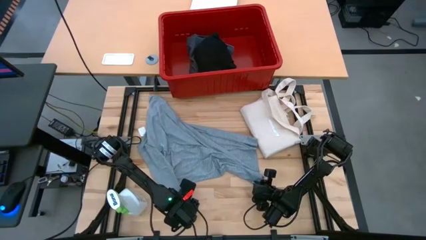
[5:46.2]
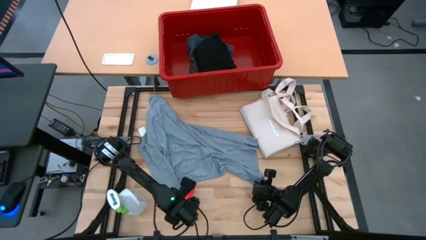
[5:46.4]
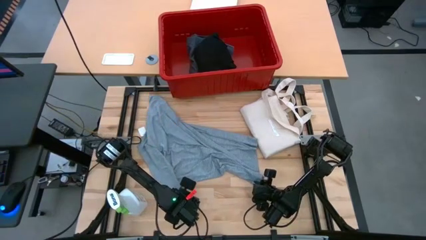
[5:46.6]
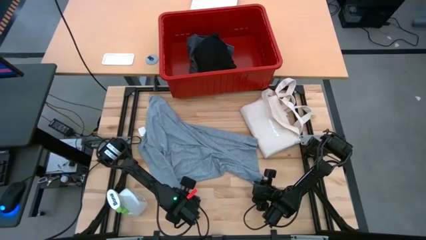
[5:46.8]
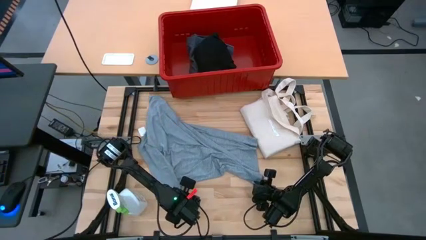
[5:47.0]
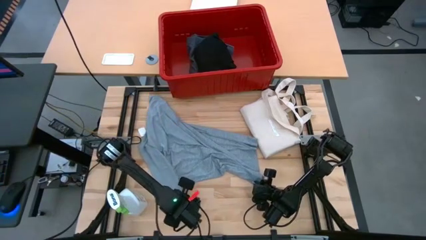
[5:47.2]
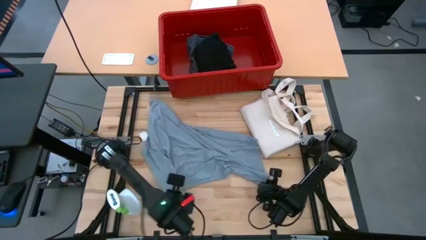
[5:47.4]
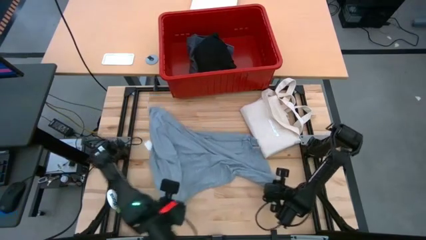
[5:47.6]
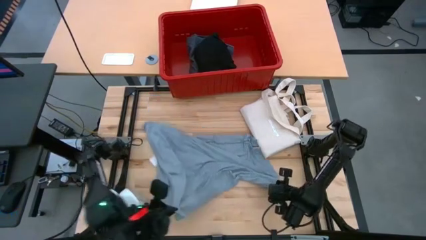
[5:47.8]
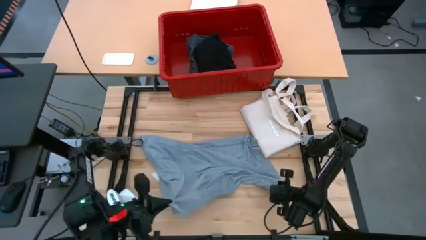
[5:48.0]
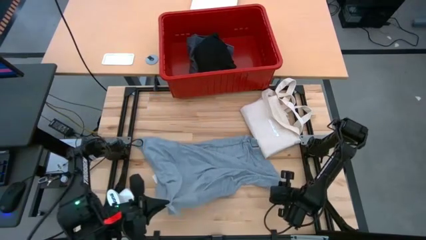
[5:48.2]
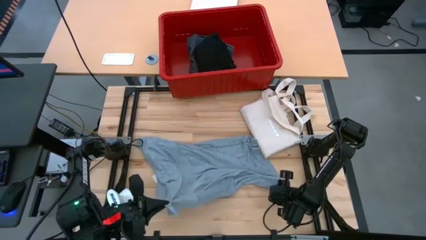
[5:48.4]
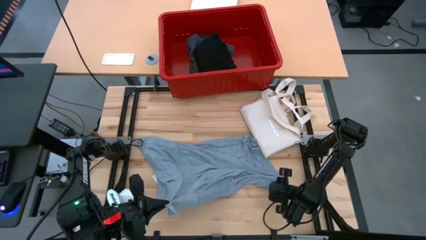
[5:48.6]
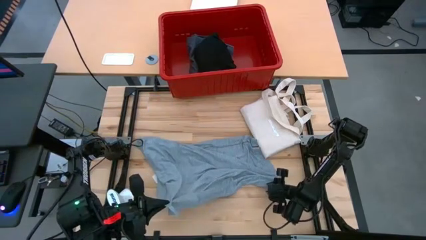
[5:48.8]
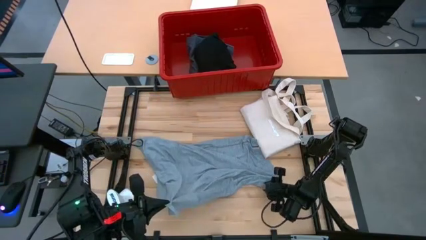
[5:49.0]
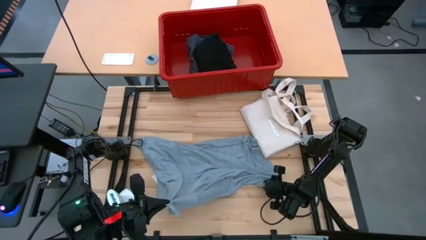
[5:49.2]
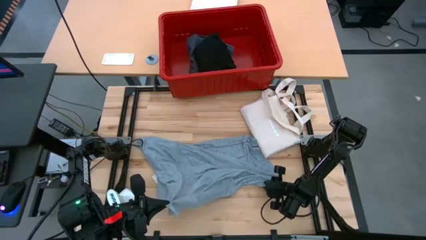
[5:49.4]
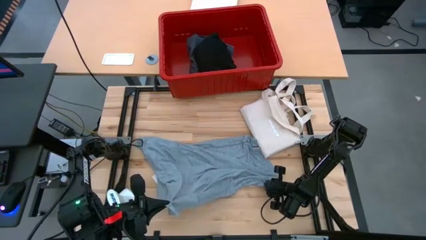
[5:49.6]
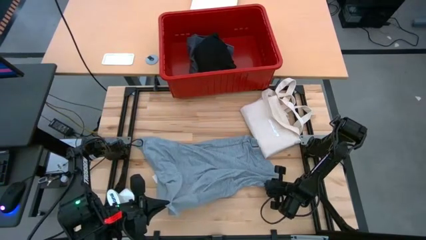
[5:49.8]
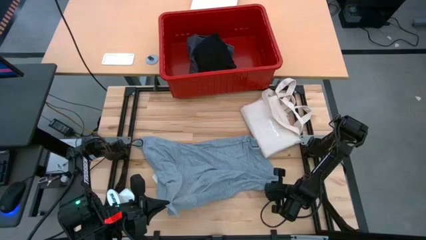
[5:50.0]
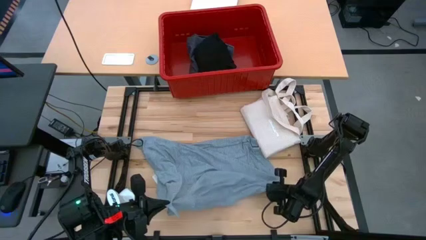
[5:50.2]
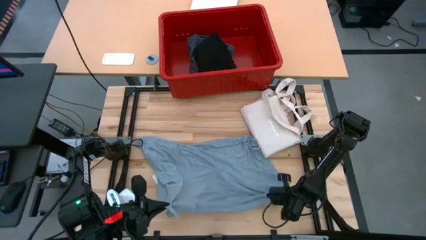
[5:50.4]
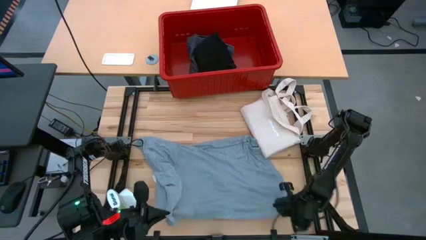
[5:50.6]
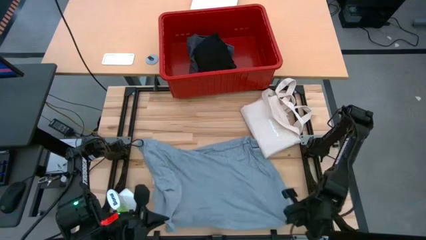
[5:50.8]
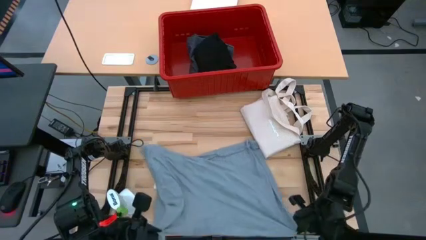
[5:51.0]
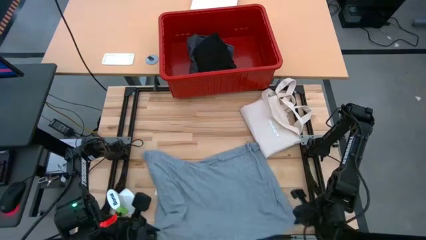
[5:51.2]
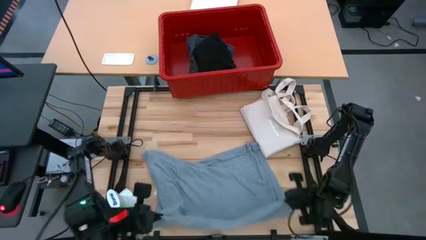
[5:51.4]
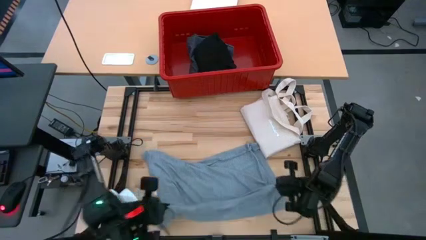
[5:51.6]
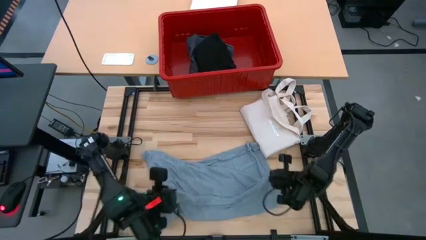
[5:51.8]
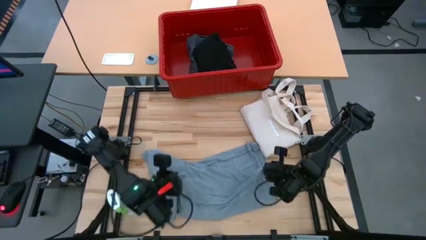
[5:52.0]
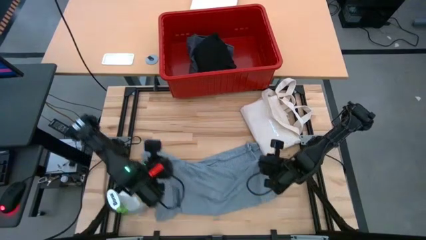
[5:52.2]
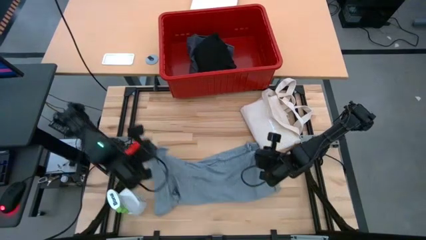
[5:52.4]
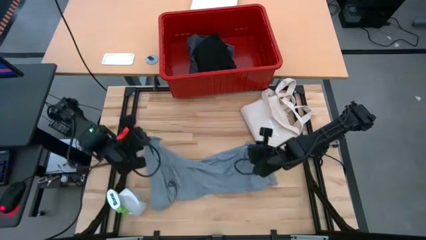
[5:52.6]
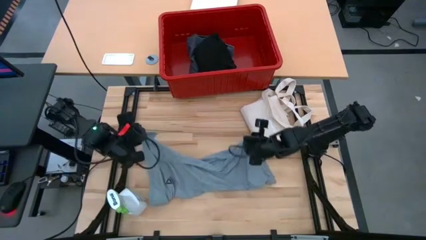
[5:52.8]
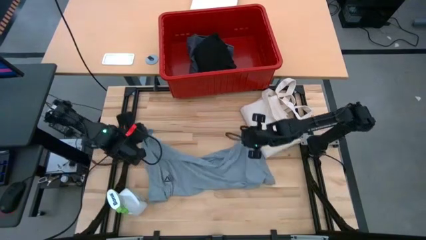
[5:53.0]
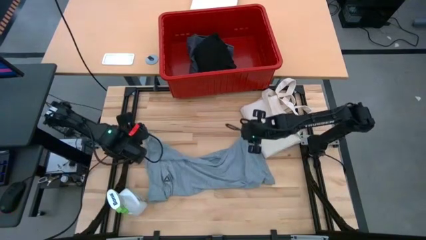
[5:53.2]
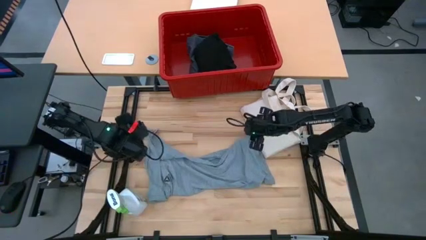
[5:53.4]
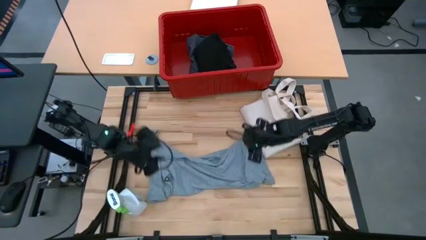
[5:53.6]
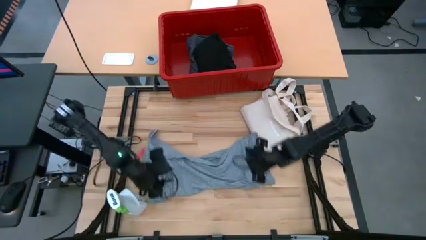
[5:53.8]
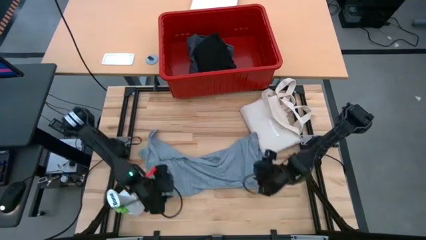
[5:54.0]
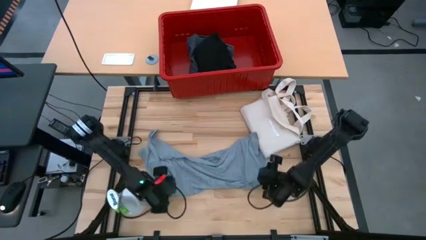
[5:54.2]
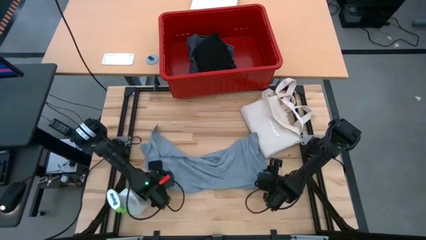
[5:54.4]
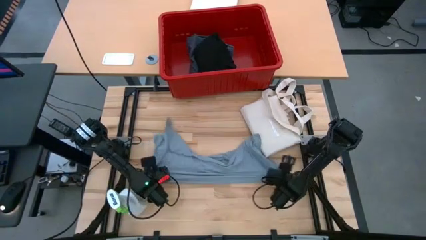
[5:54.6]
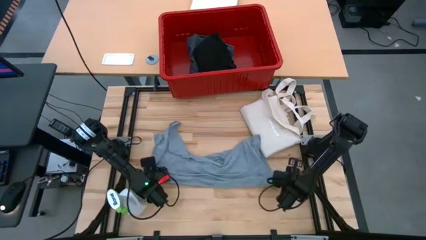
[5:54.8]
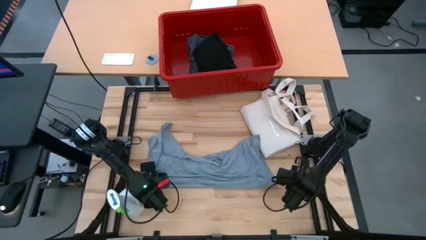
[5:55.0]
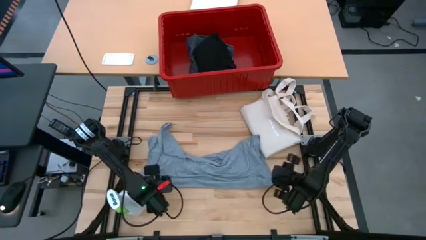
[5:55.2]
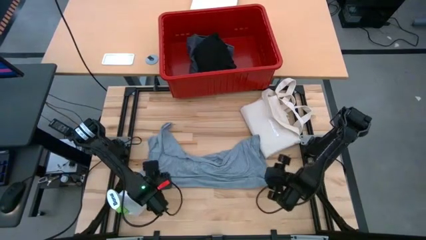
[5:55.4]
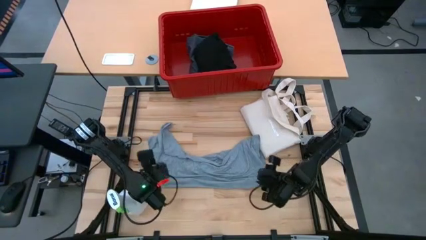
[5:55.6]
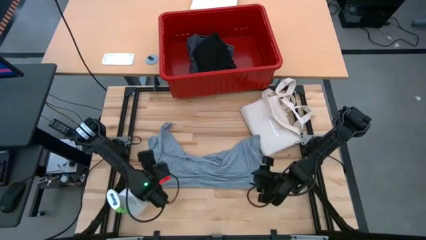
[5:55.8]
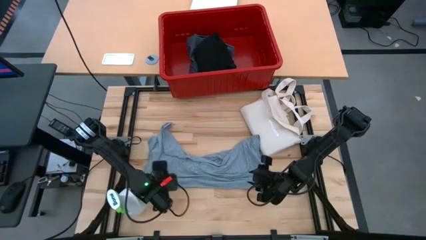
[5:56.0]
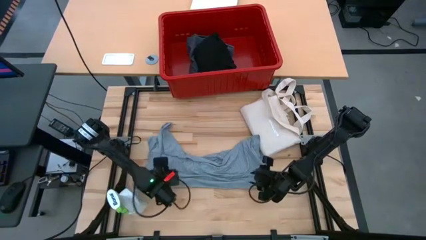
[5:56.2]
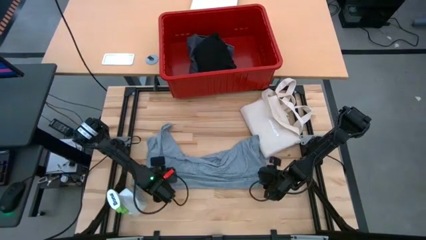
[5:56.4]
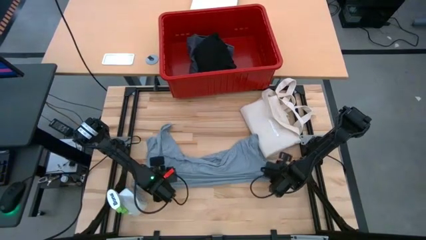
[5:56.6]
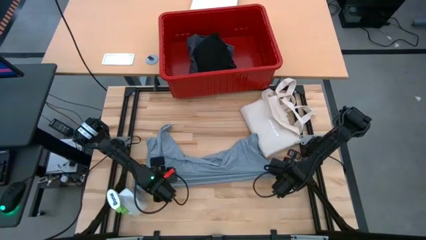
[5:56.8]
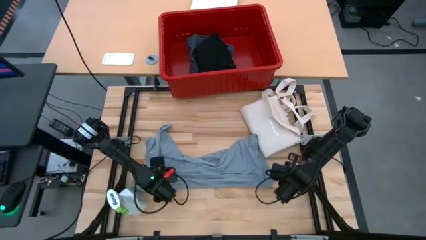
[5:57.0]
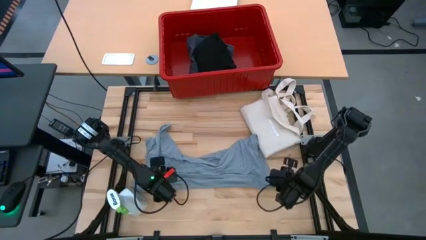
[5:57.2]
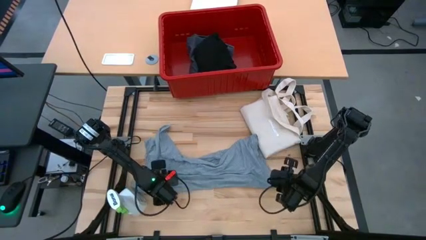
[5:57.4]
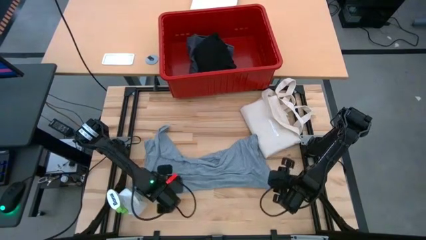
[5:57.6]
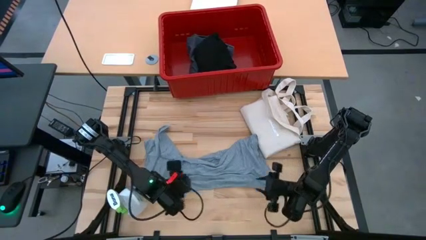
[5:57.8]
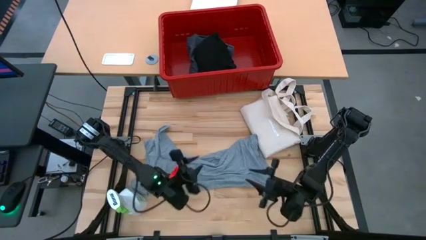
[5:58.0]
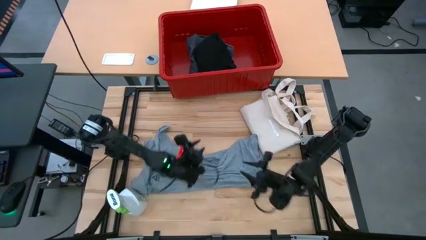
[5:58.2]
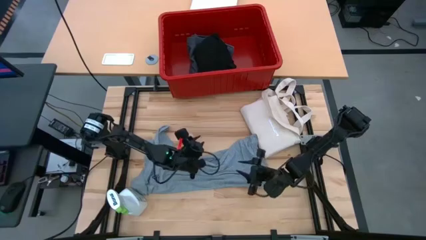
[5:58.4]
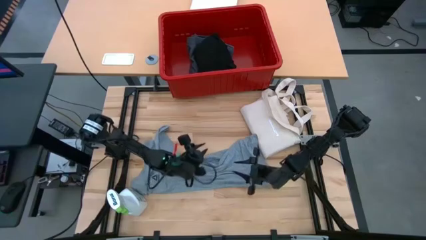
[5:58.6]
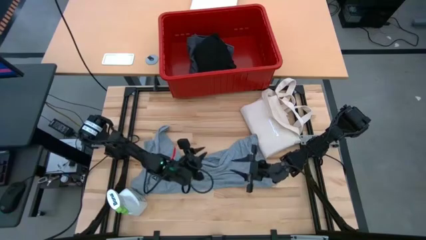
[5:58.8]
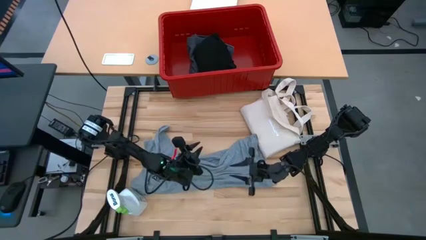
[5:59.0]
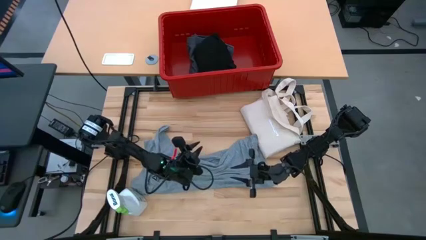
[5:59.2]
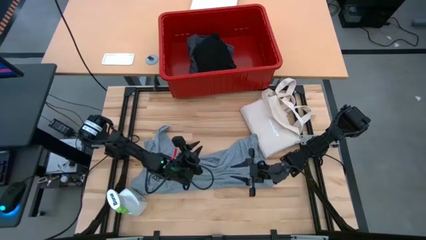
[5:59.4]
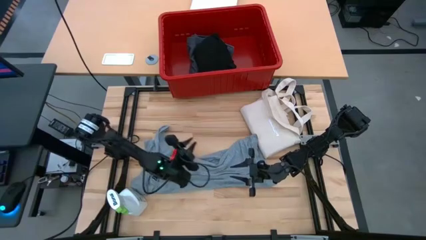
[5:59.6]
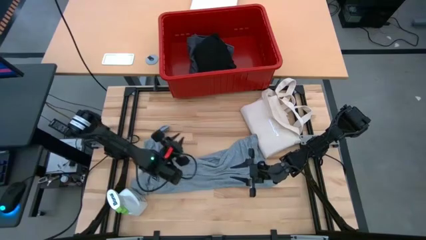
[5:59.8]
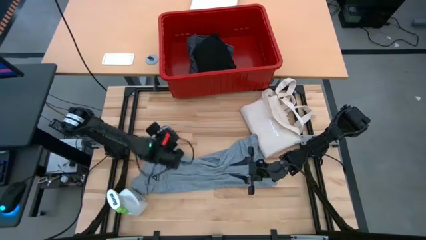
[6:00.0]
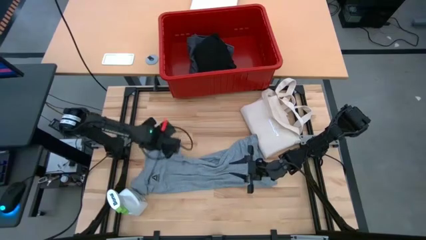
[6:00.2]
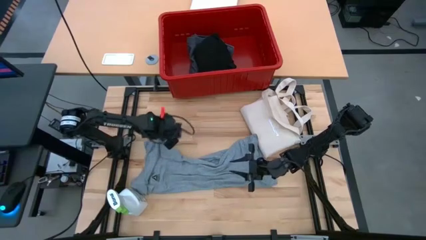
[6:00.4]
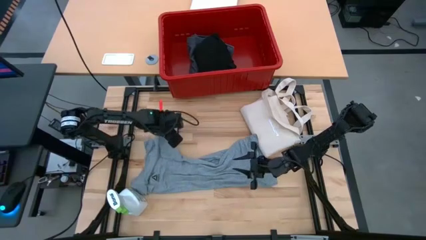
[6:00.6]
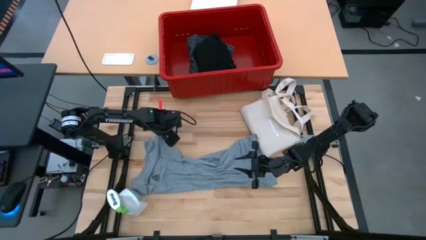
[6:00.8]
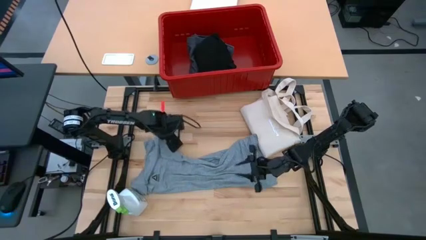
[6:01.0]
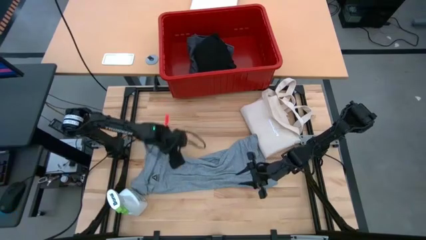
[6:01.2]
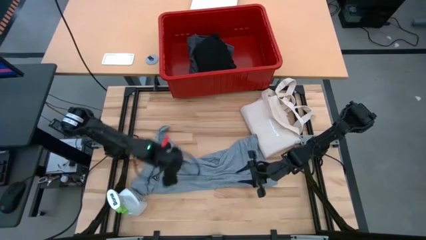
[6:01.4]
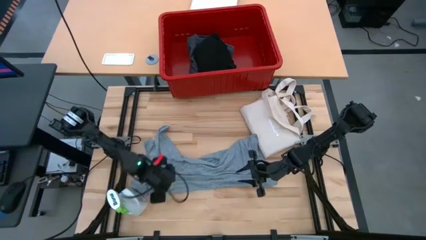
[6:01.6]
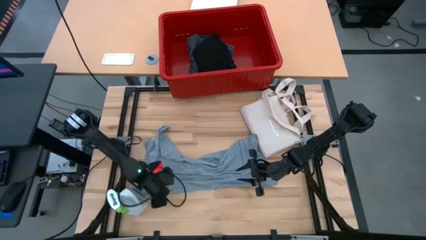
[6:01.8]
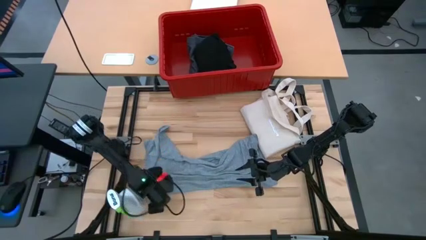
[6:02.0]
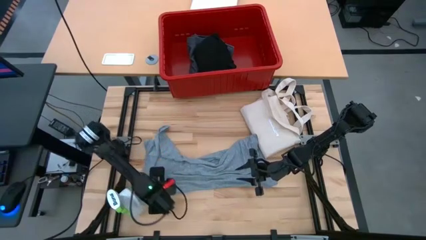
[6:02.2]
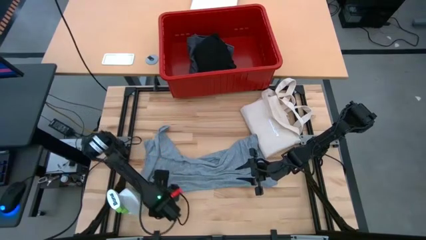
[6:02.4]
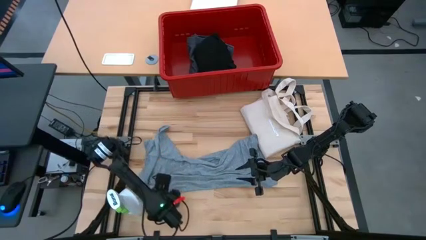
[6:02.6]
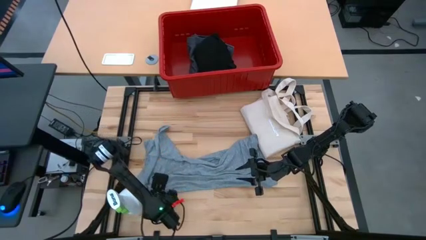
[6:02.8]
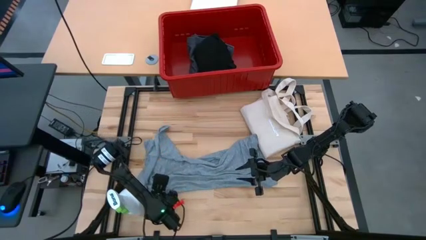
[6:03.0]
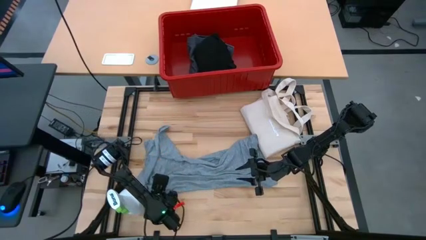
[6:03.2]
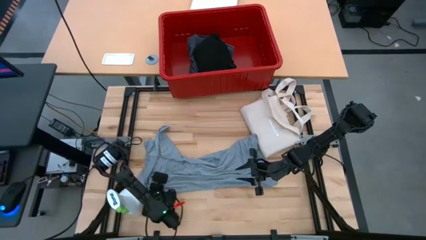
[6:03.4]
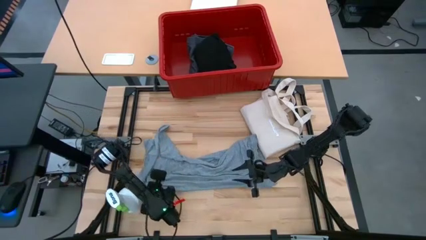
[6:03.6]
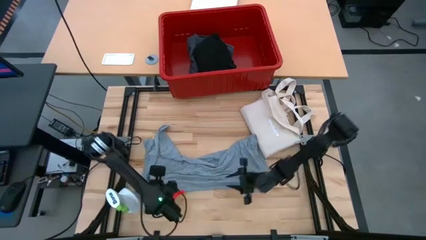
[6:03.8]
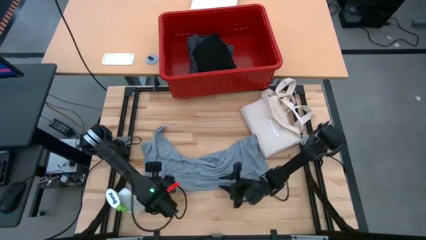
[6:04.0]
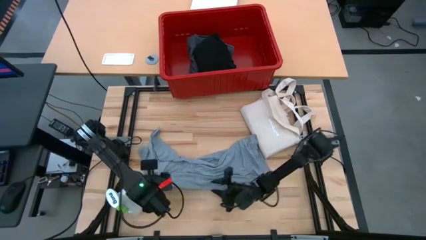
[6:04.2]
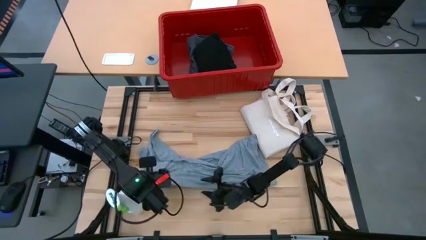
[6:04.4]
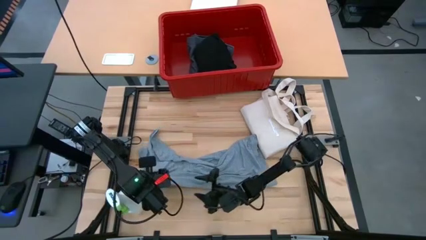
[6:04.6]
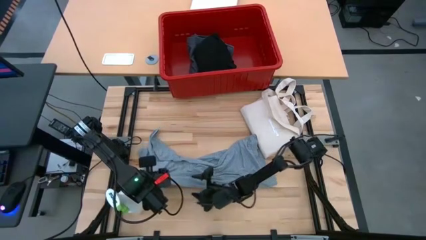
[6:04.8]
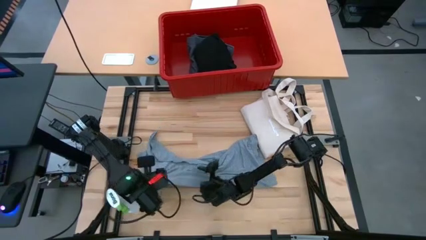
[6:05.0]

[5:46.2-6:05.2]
Task: Fold Laundry from Bin
Fold the gray shirt
